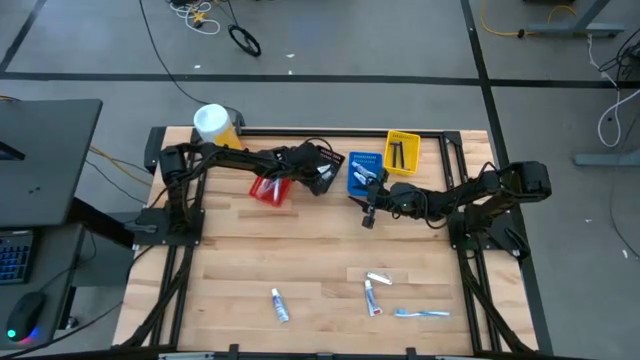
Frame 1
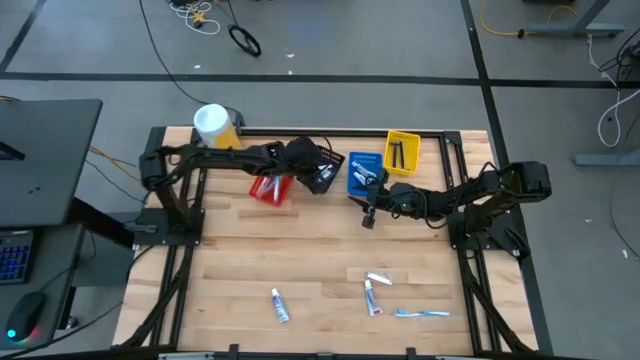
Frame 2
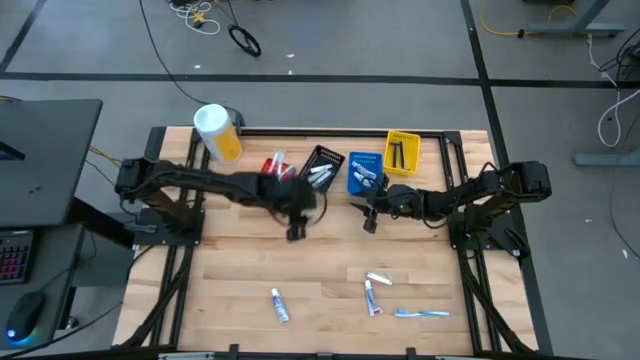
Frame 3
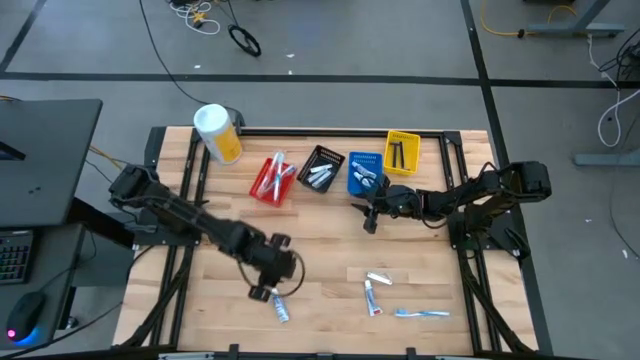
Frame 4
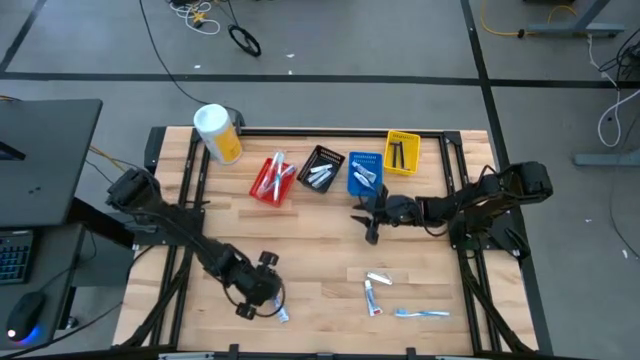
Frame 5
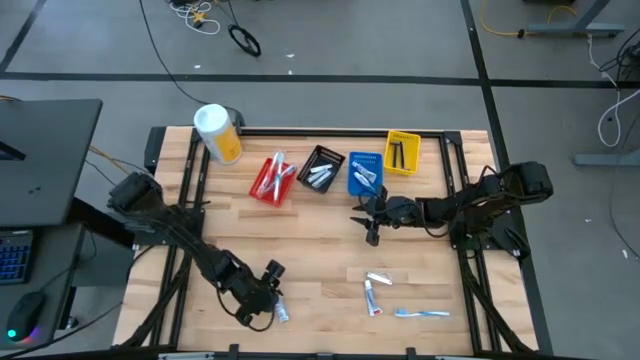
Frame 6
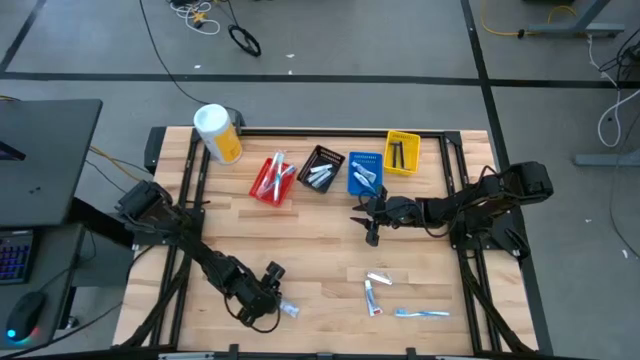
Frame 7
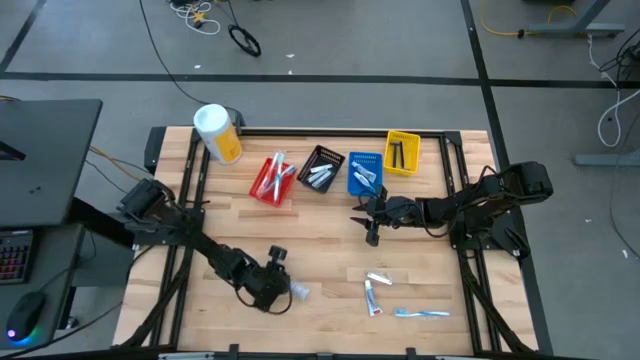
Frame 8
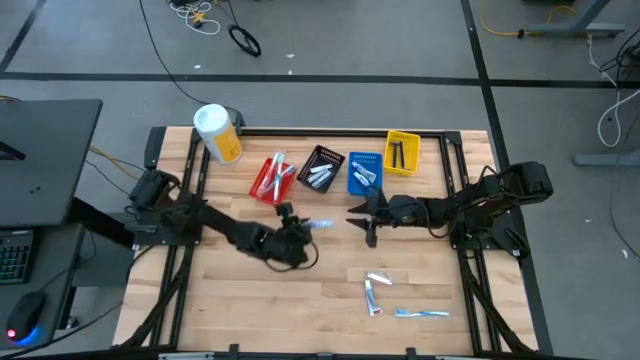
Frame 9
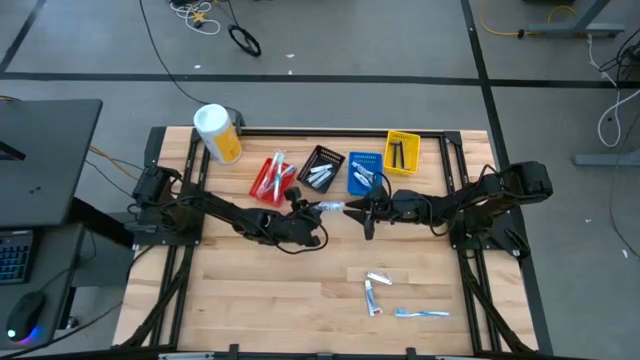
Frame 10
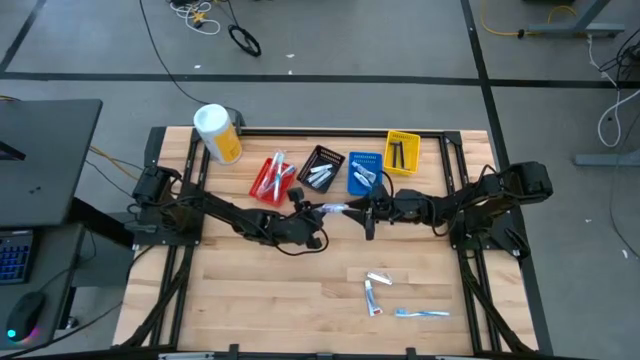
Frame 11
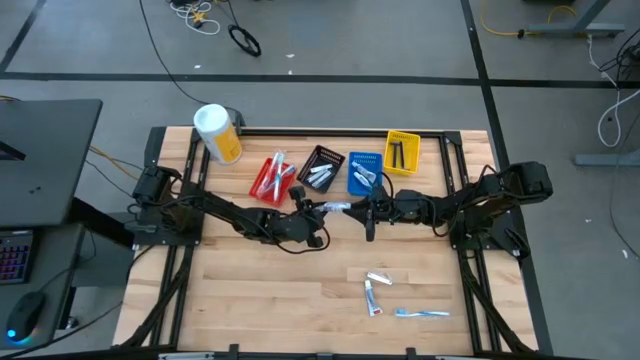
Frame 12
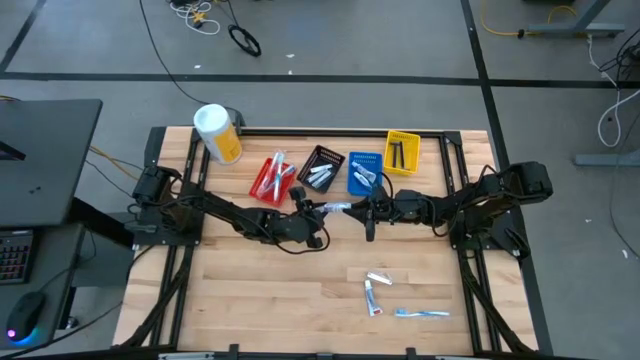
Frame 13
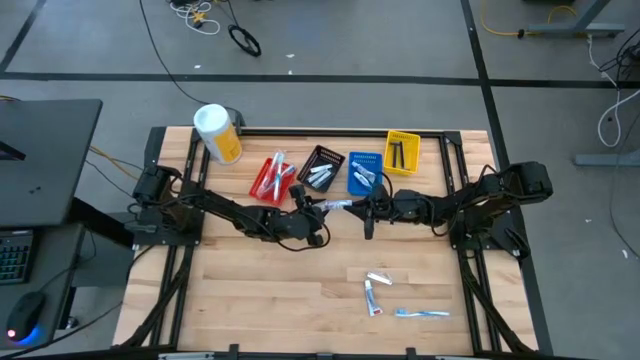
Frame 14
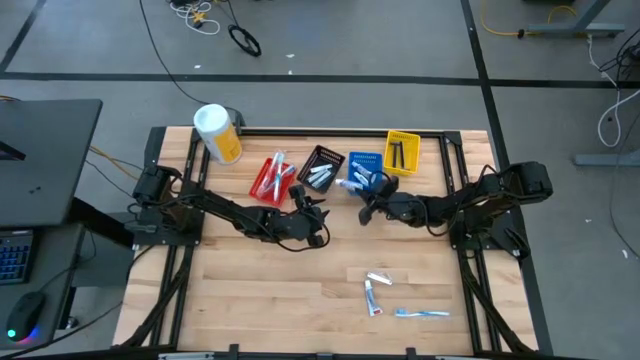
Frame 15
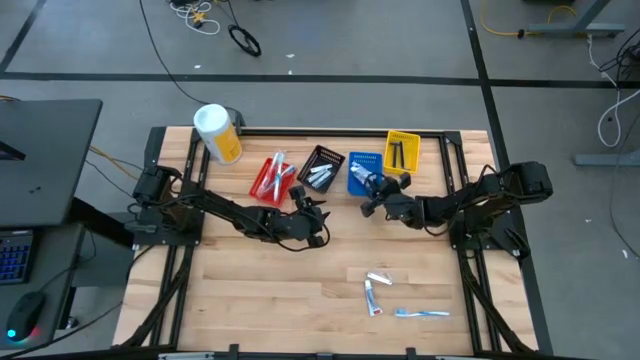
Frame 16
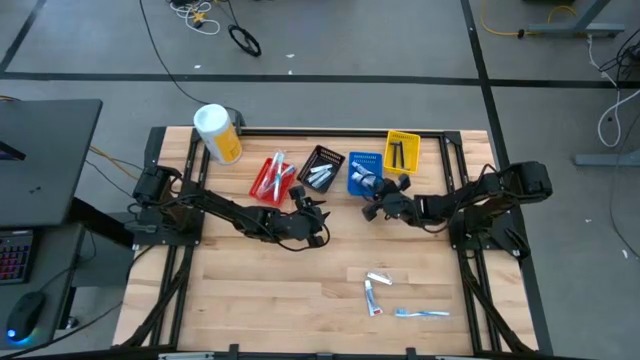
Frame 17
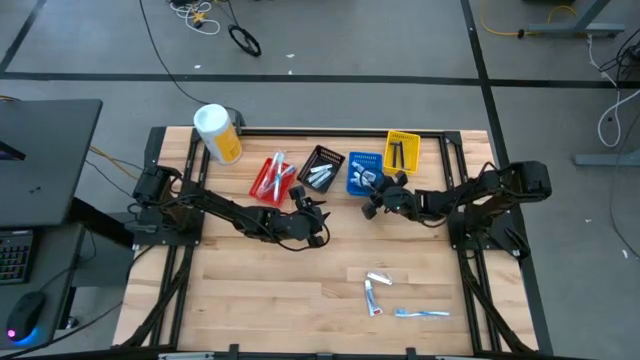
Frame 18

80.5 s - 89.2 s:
Task: Pick & Place Travel size toiletries
Put the purple toothpaste into the blue bin

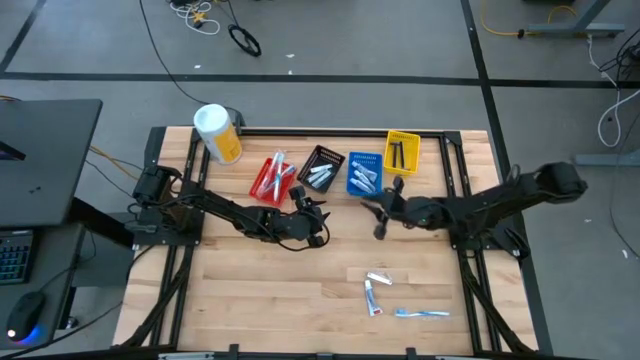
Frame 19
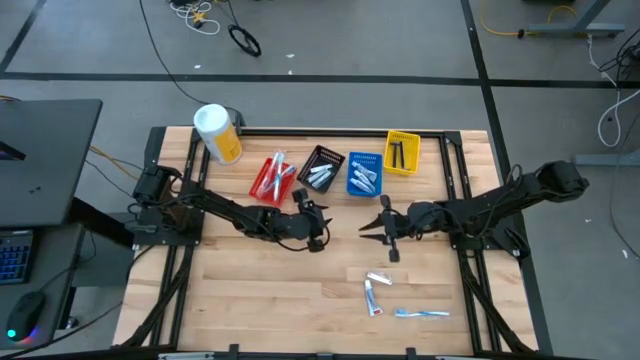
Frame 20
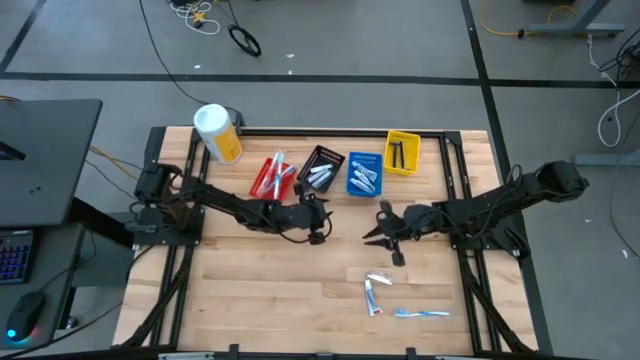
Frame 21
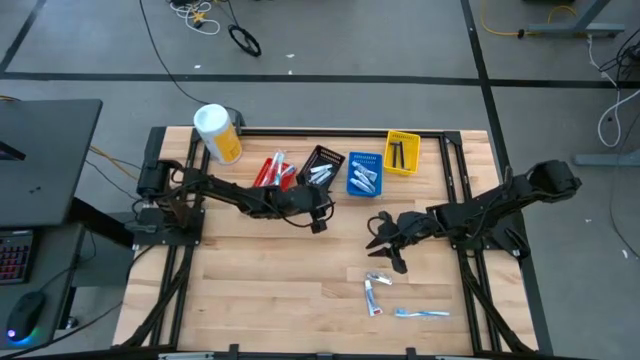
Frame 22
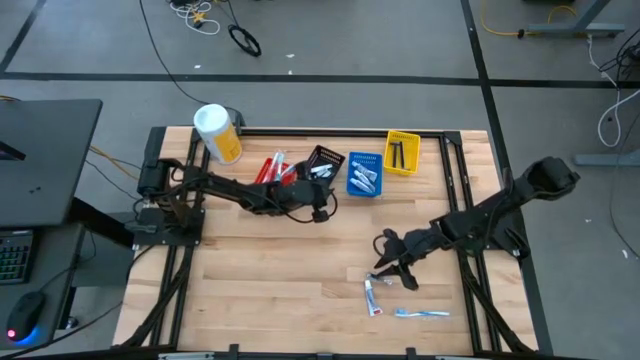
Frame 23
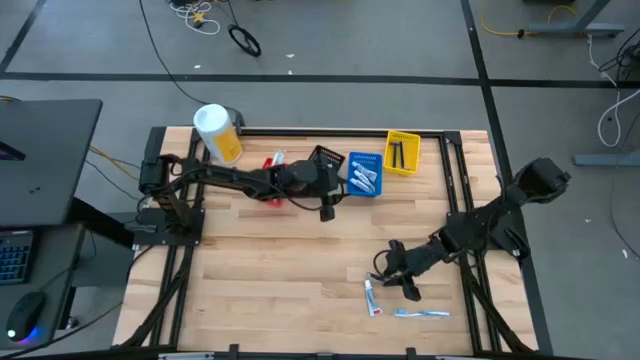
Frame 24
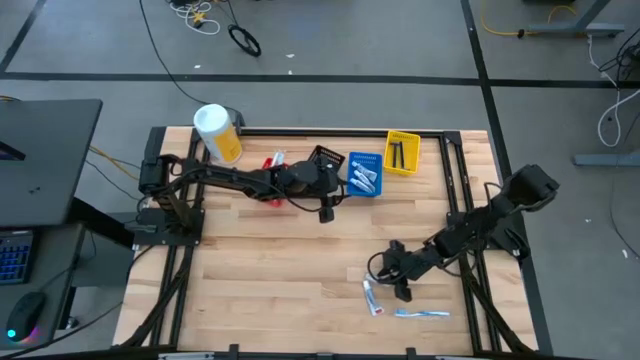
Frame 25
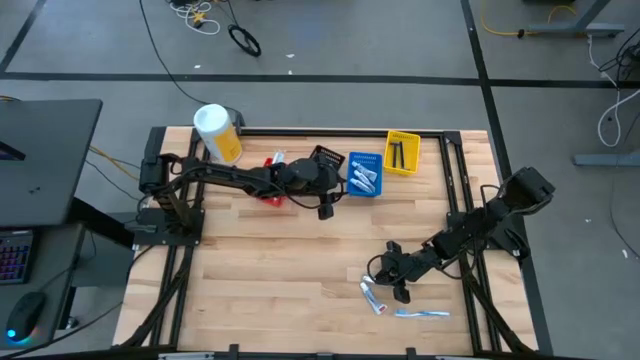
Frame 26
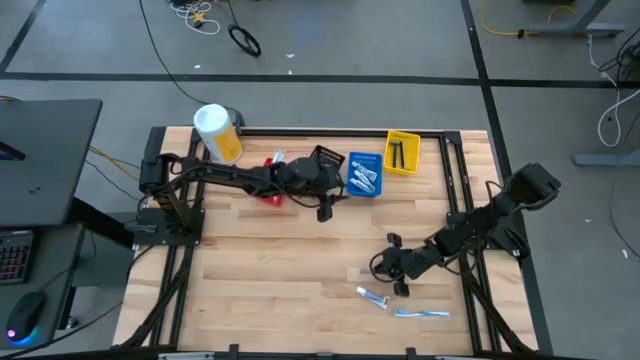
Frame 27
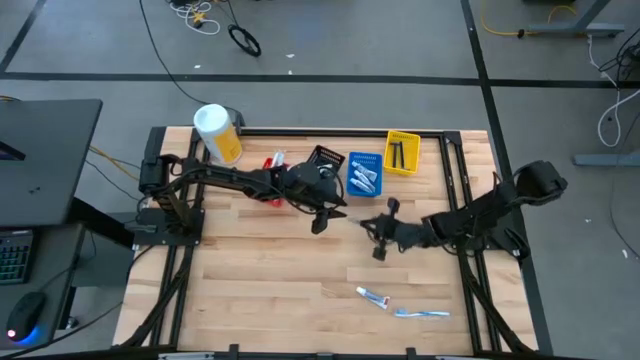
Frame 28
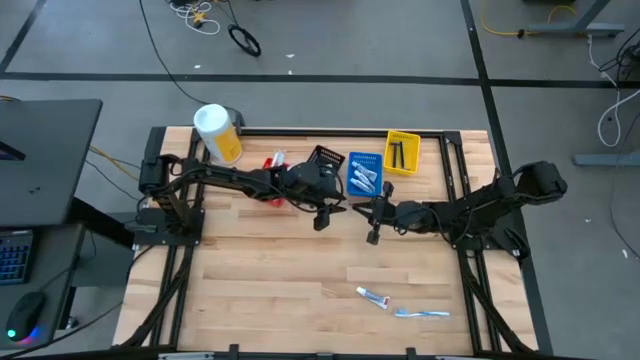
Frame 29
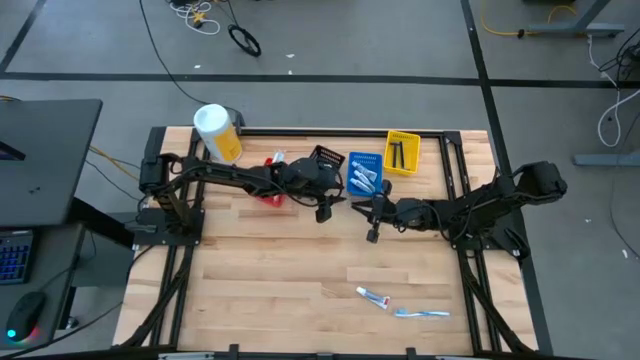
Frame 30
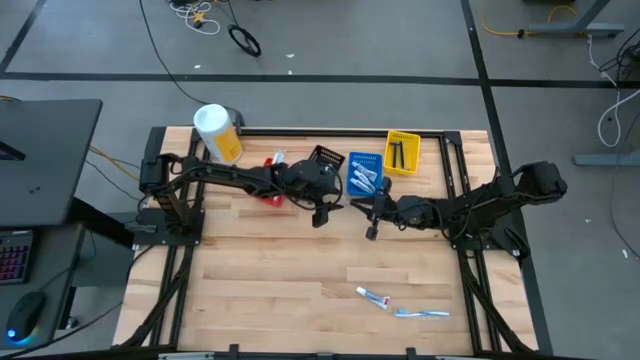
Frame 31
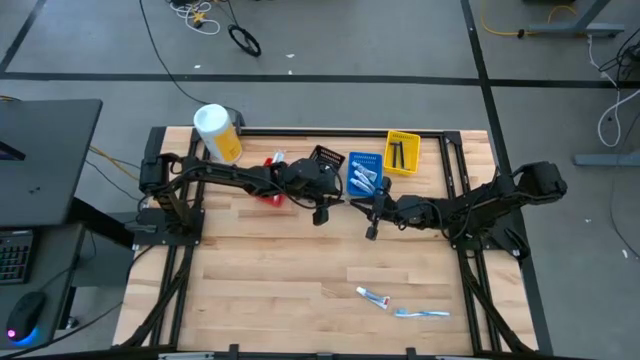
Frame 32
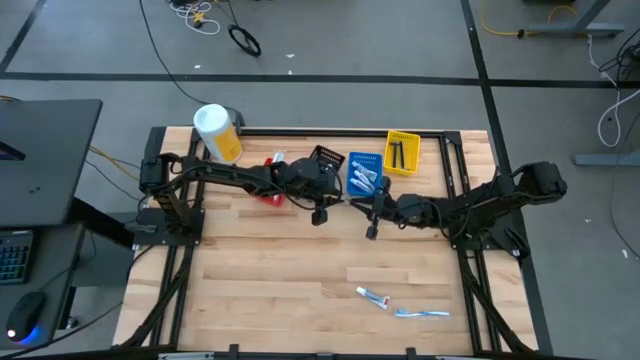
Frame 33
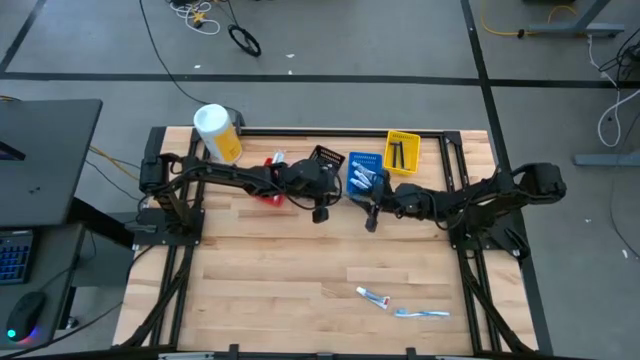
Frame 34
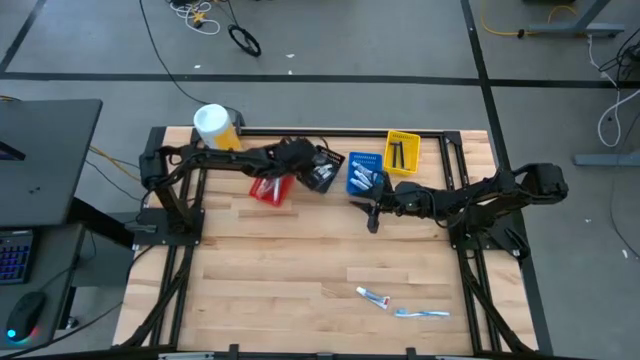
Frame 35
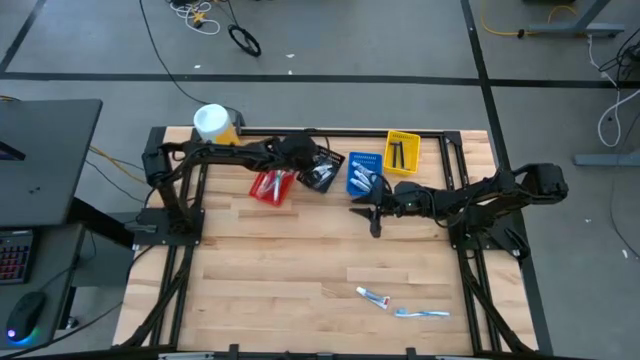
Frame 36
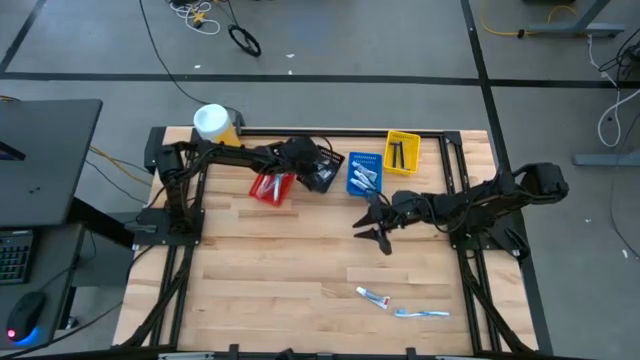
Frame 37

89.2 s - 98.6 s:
Put the nail cutter into the black bin

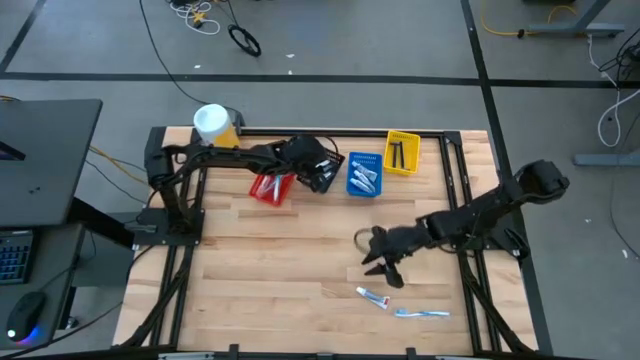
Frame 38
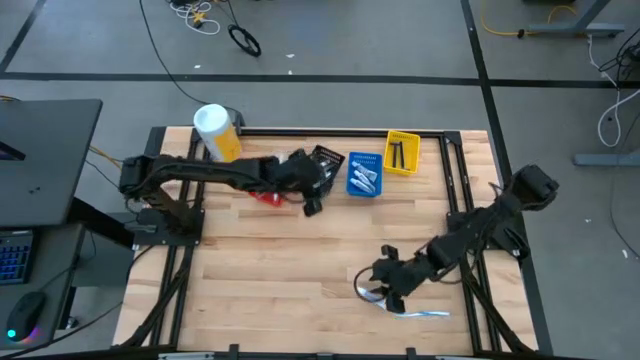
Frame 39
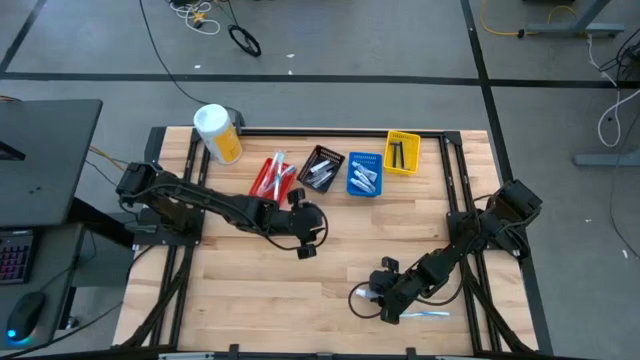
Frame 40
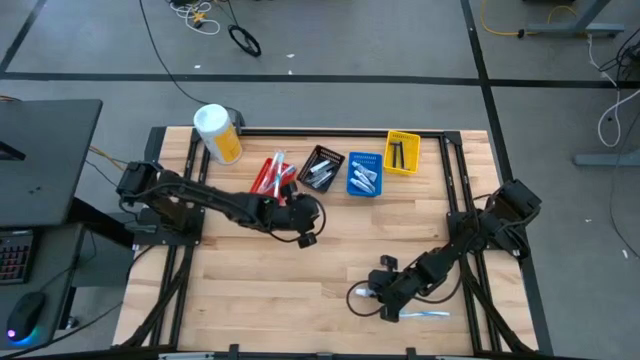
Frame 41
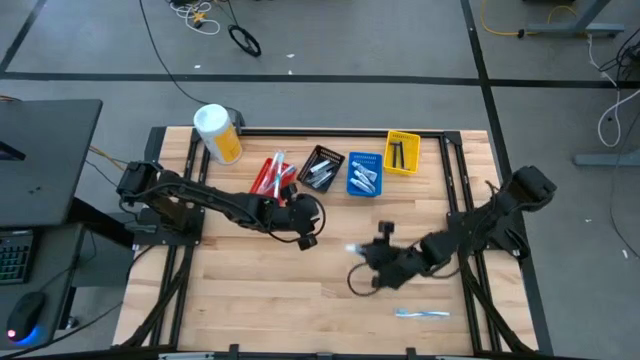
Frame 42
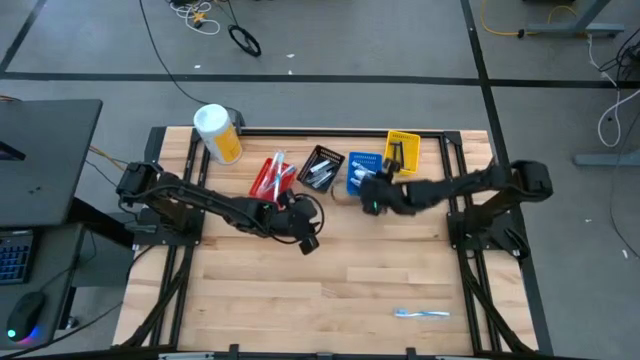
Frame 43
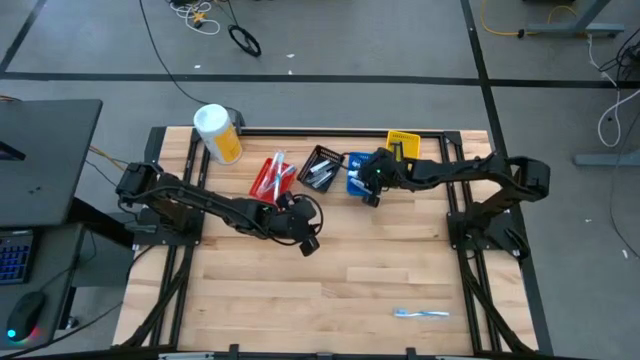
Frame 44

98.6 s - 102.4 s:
Put the purple toothpaste into the blue bin
